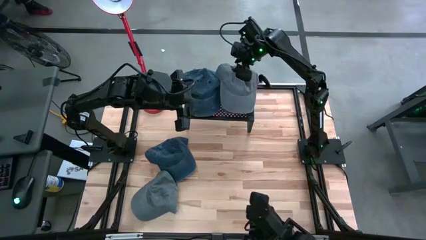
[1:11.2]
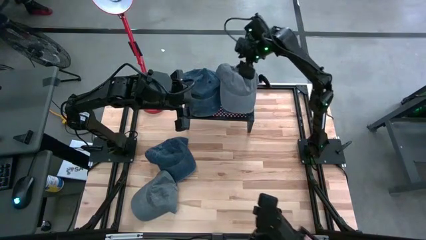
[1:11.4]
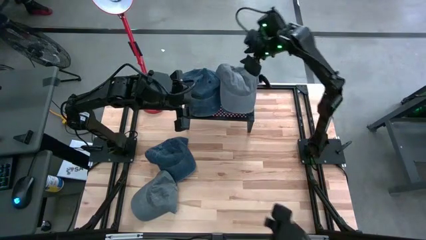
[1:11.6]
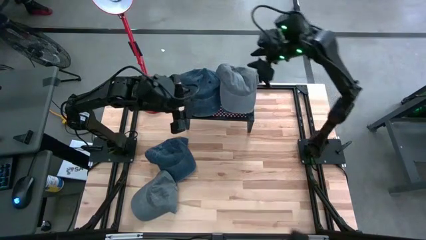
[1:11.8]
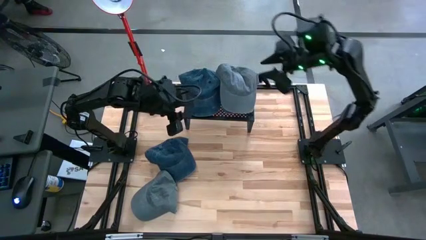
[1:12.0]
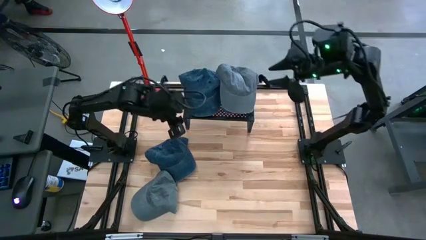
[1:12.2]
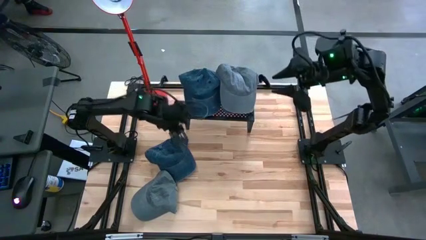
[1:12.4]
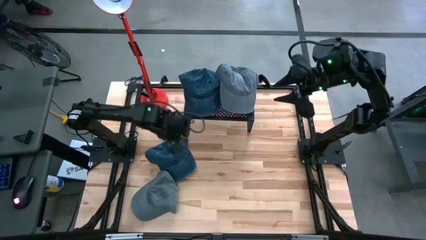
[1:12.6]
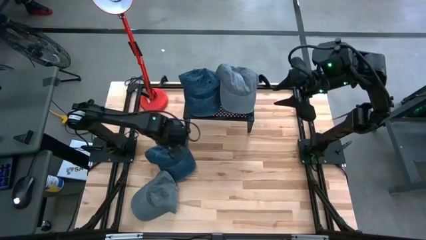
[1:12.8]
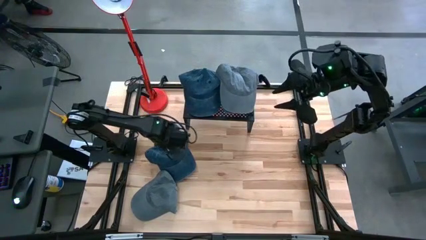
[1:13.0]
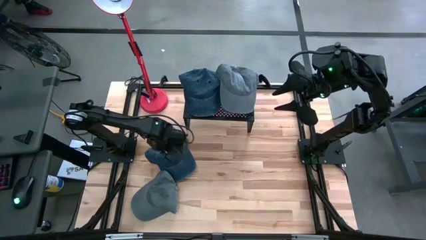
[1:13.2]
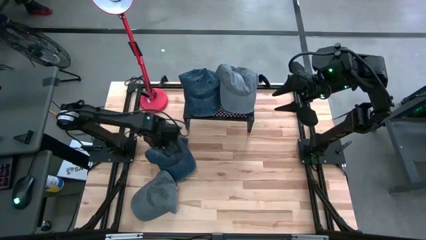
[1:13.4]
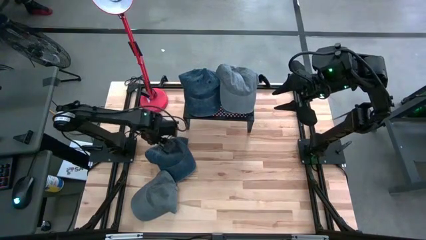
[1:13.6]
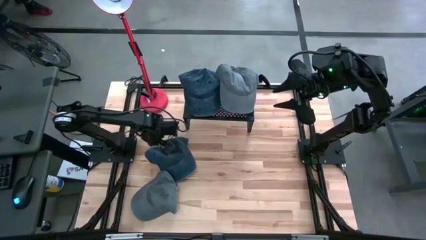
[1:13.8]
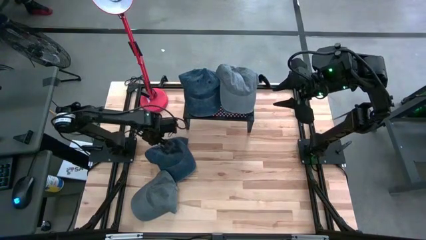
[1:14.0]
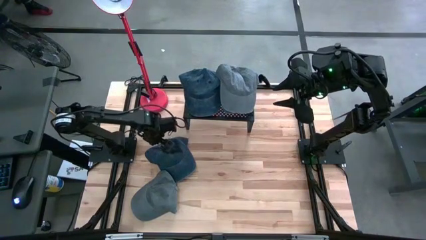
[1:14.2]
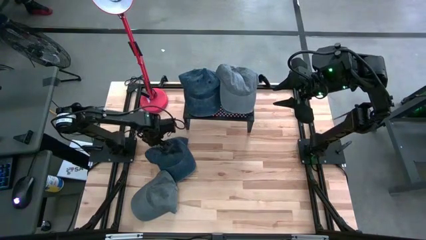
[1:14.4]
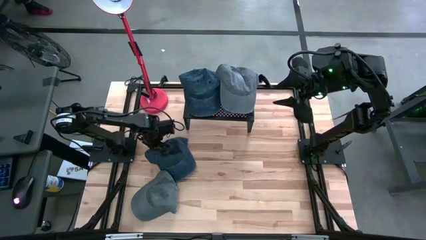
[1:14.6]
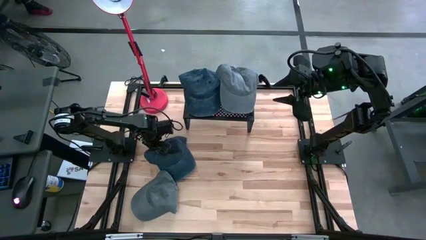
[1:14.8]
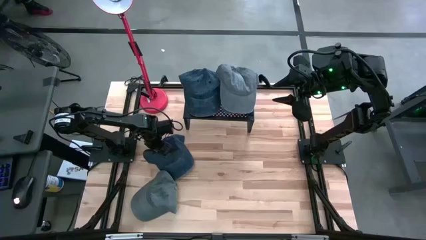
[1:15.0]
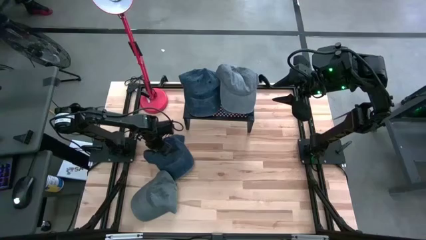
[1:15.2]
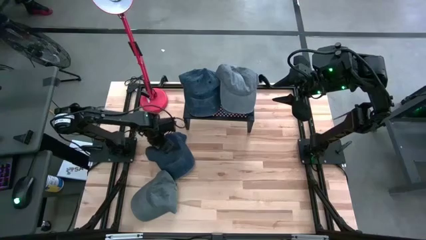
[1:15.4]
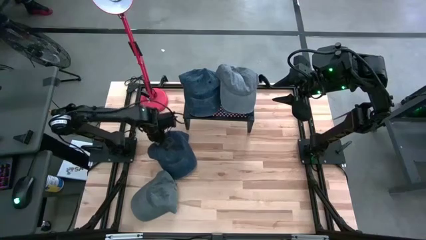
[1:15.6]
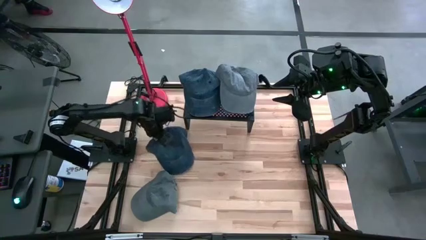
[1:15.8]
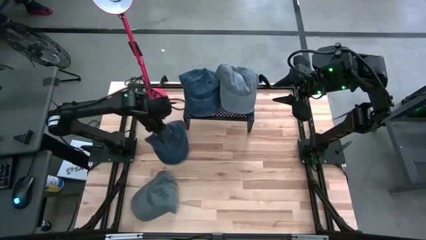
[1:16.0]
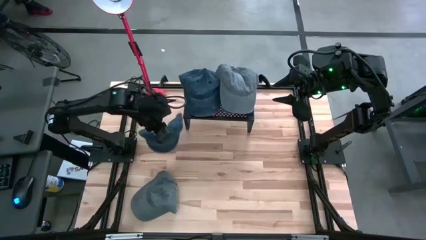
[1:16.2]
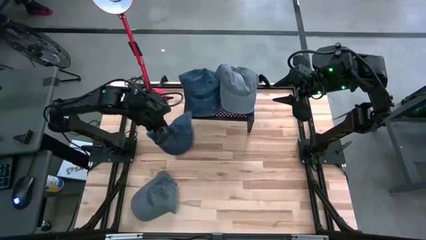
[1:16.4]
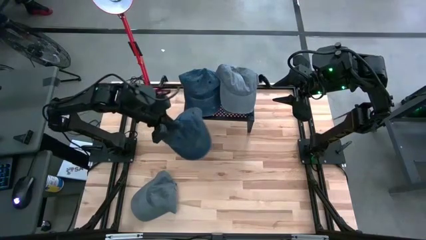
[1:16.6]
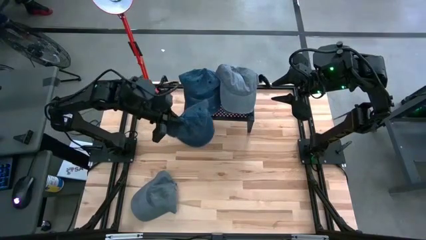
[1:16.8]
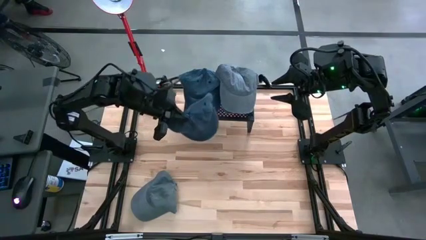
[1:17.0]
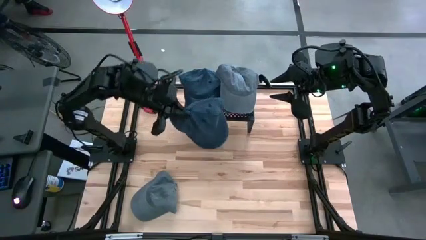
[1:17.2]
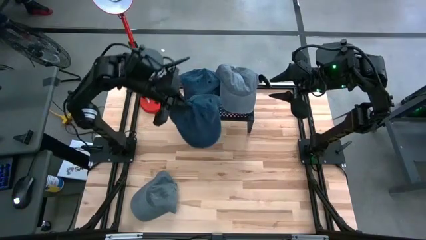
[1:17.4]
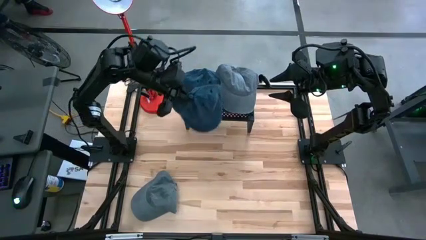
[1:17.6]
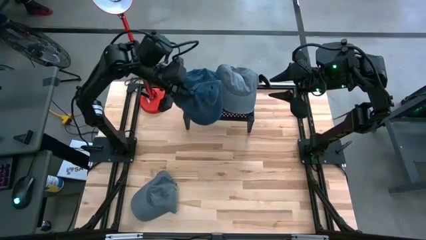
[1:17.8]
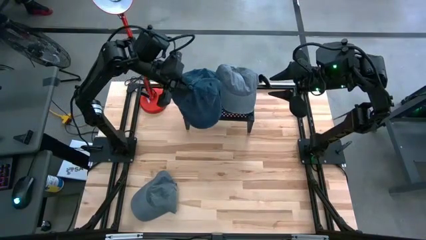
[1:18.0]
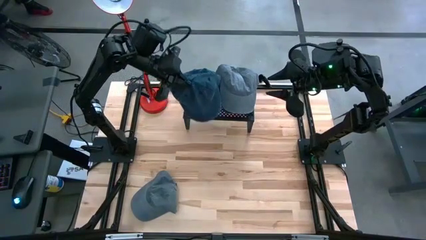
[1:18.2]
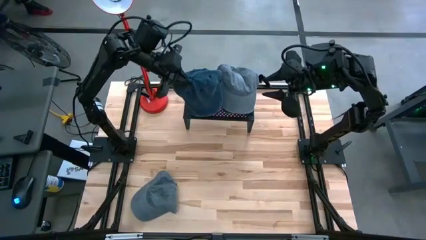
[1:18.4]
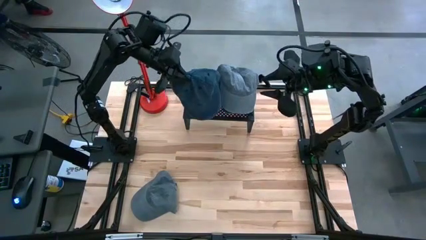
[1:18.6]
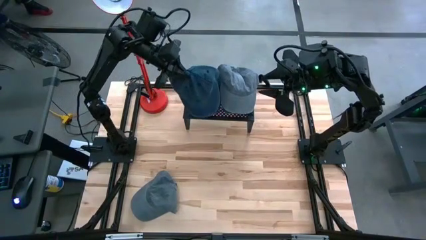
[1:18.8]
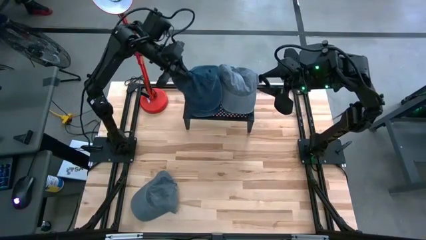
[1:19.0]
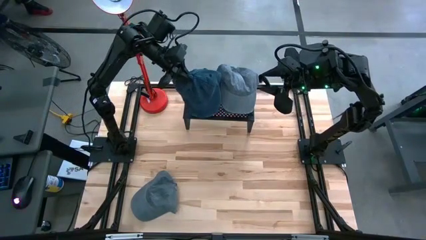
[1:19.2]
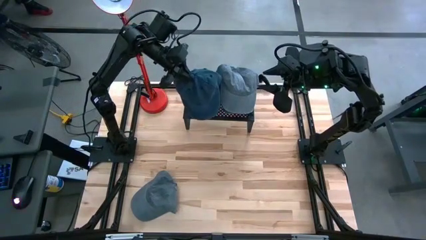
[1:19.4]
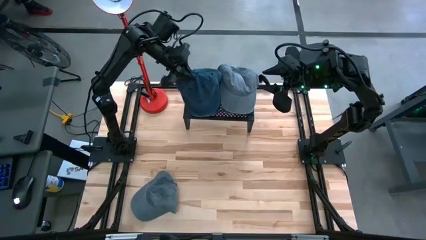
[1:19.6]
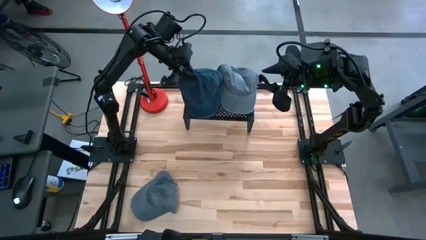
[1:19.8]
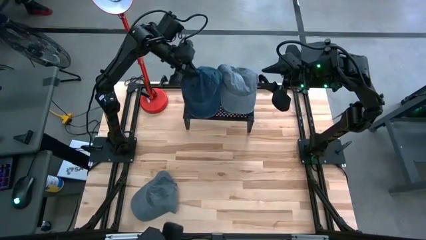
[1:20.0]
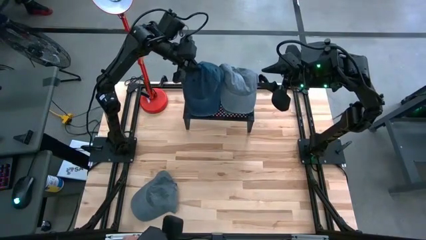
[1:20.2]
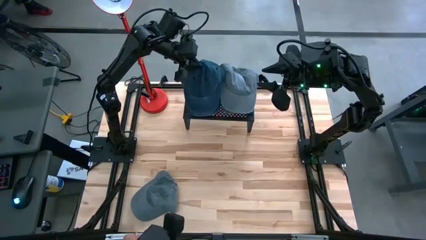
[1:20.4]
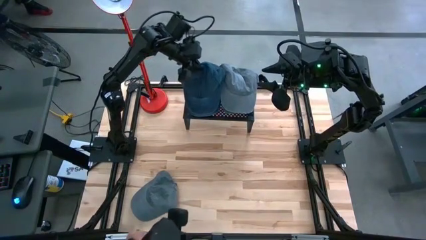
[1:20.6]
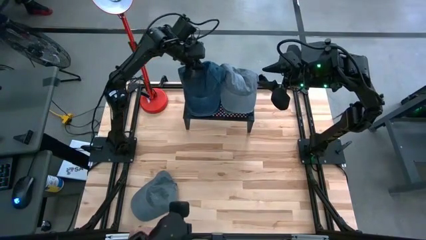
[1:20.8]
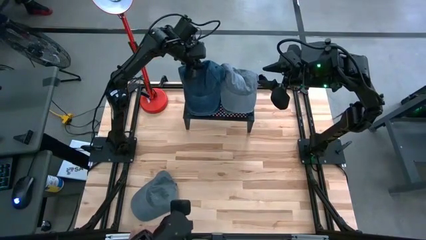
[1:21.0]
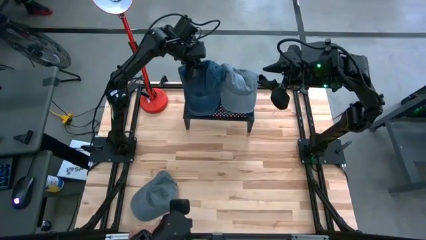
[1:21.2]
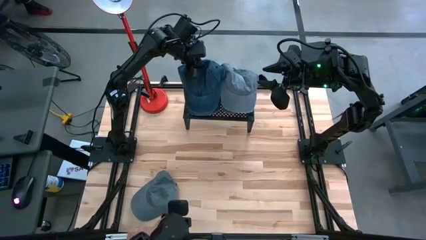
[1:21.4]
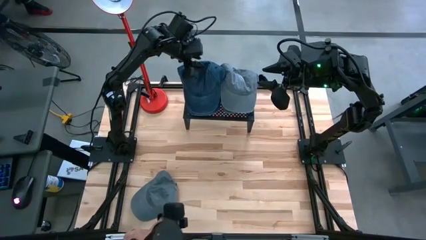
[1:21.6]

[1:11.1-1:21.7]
Task: Pick & Place hat
Stack the blue cap on top of the blue cap on the shelf

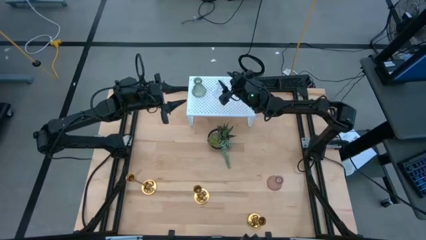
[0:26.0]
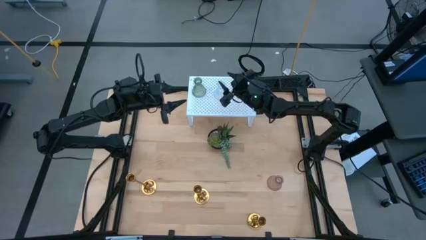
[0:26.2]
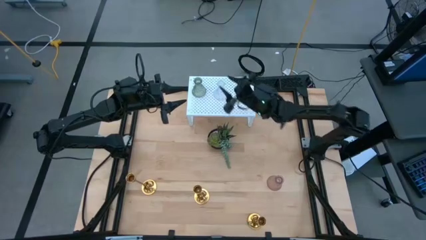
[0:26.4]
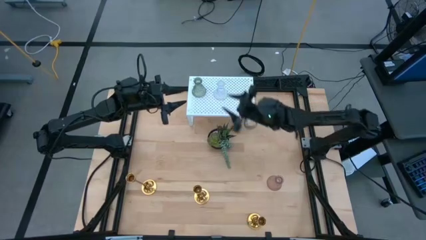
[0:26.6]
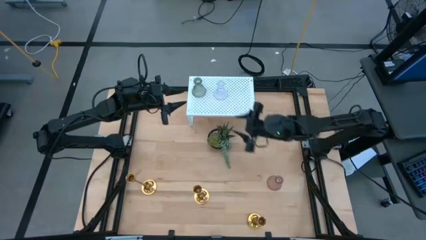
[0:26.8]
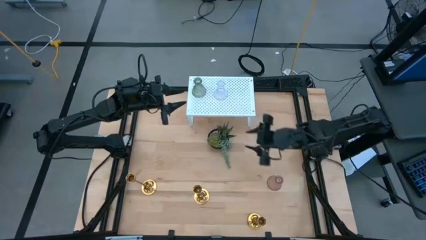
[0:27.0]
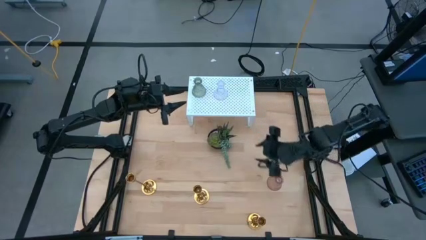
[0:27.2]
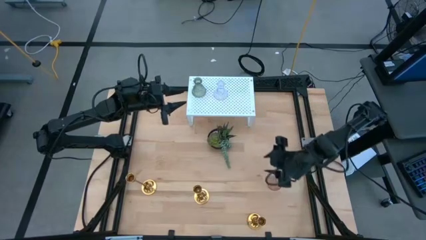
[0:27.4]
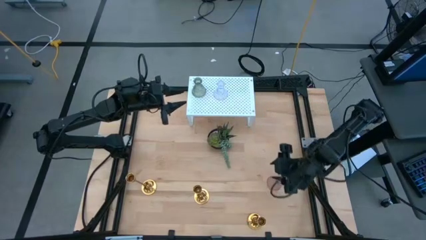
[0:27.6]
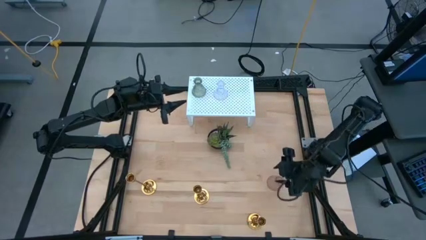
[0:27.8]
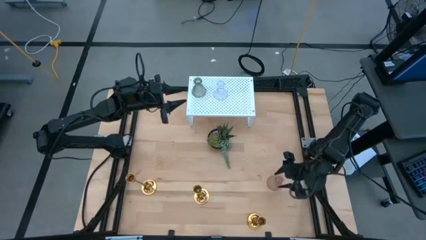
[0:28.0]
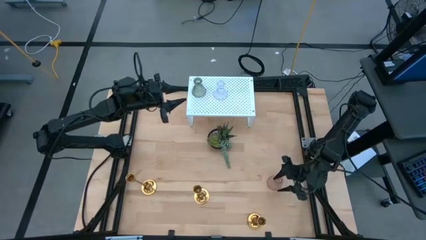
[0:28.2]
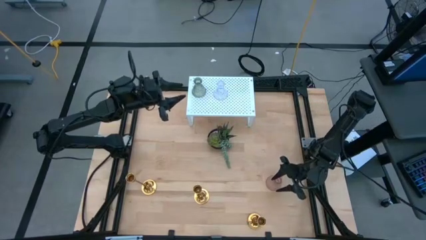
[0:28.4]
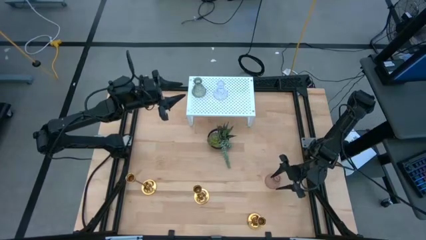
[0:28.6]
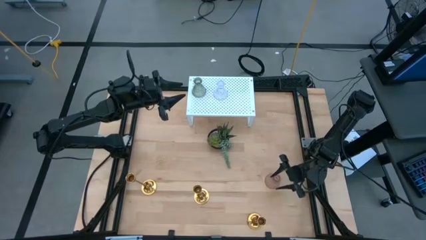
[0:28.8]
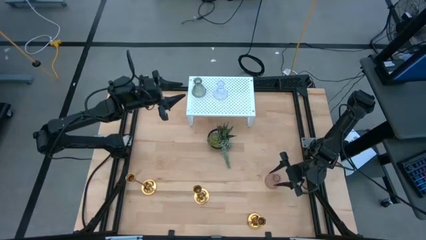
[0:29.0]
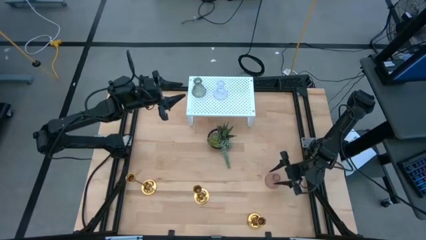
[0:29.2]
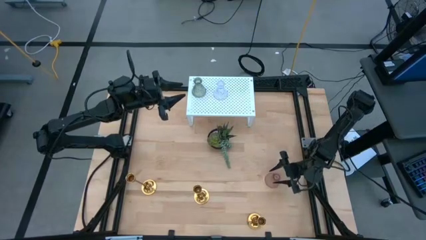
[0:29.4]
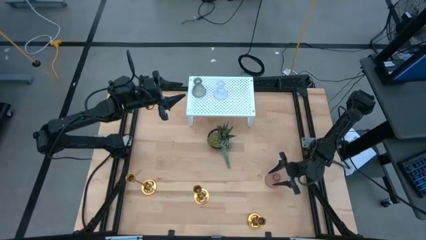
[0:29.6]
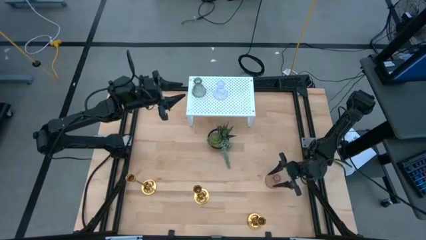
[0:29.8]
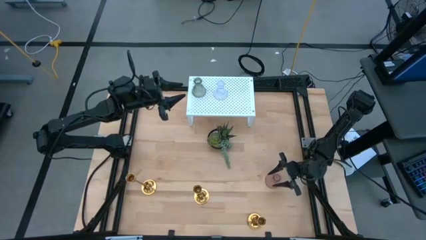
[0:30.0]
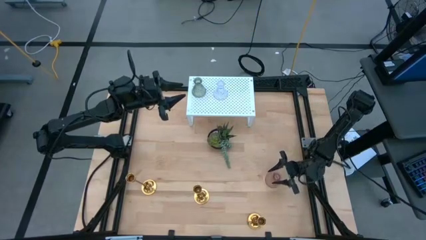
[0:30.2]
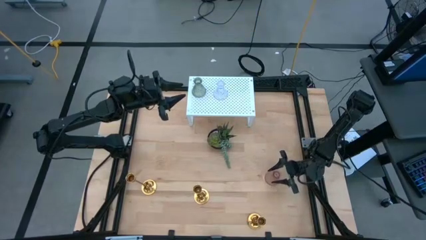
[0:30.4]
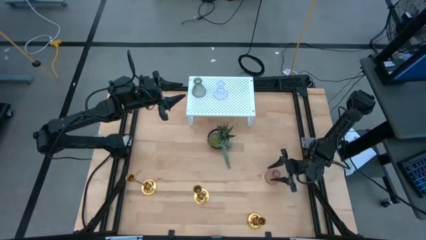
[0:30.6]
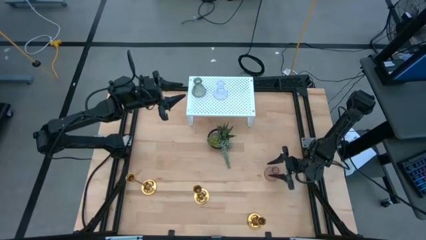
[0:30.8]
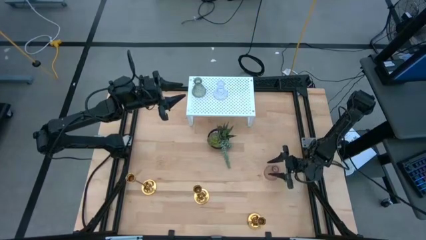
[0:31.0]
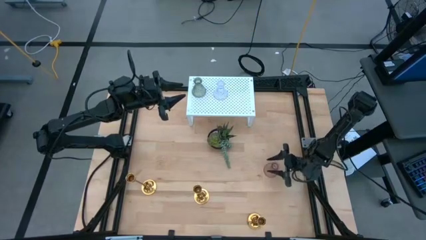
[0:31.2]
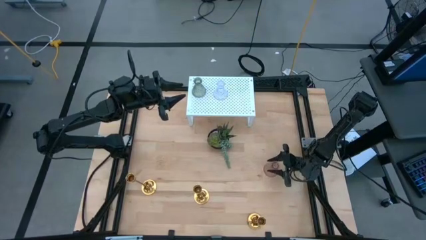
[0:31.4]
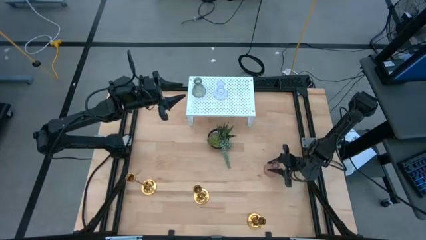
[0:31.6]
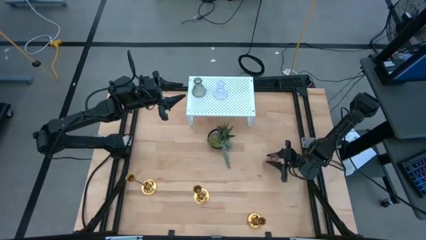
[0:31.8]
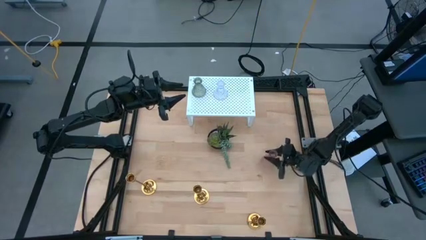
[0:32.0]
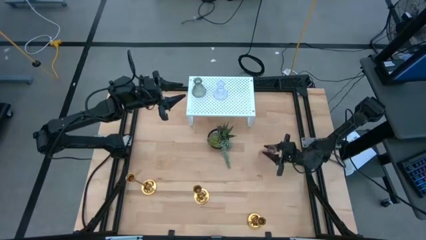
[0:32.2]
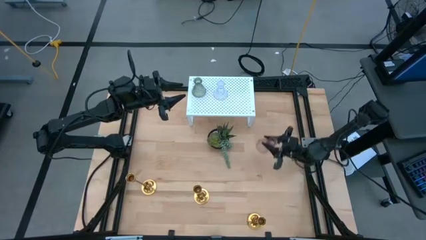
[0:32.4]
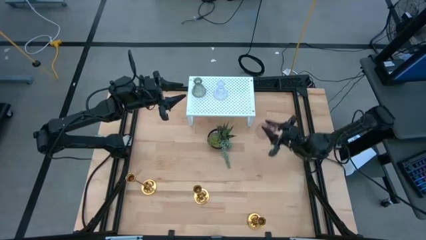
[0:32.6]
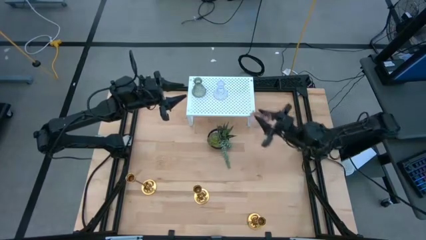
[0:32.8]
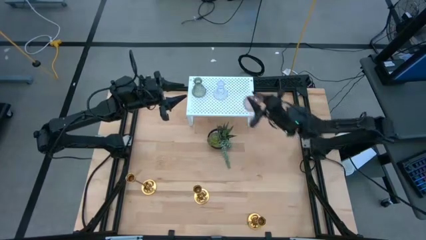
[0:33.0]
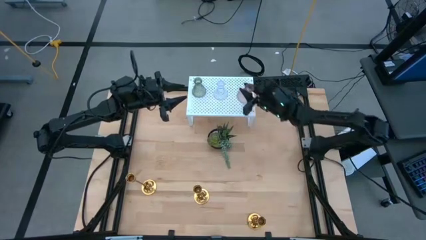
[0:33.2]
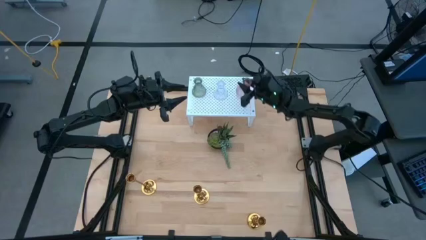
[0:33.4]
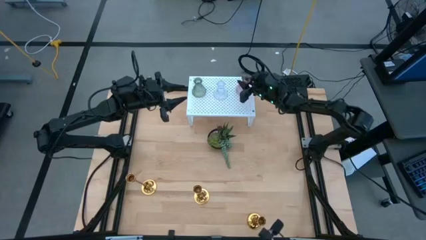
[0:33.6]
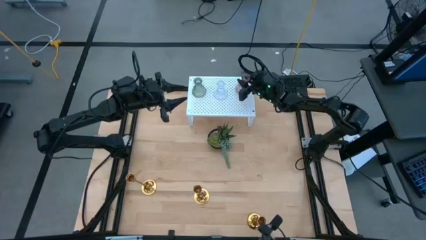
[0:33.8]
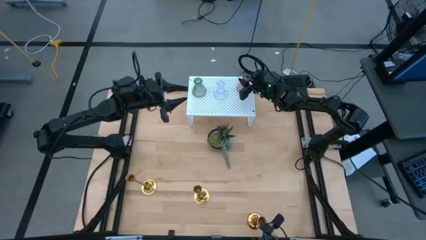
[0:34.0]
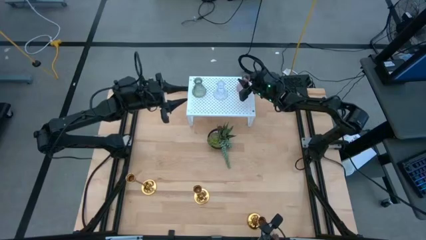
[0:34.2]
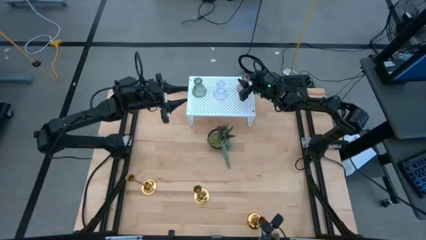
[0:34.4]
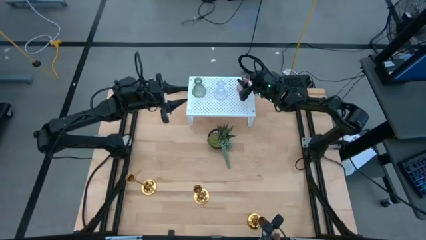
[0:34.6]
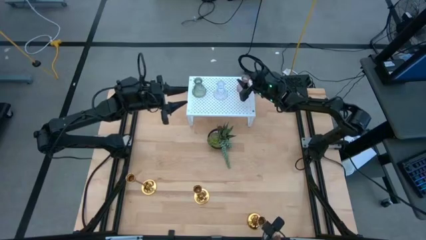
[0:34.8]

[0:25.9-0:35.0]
Task: Pick & Place candle stick holders
Put the pink glass candle holder on the shelf
